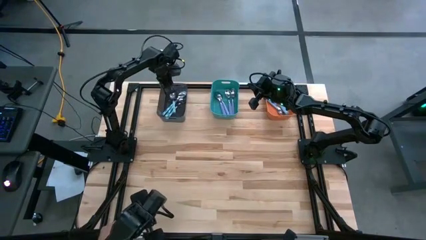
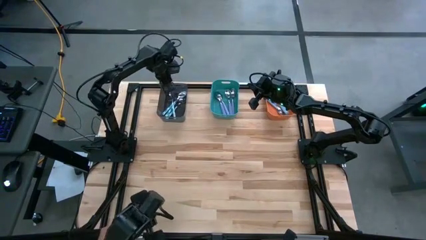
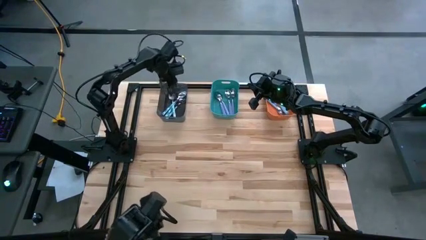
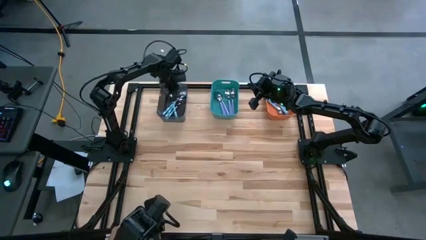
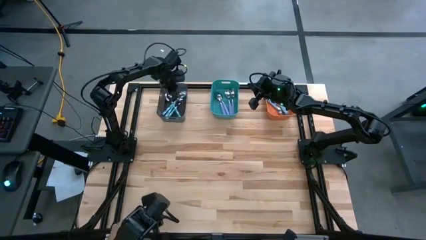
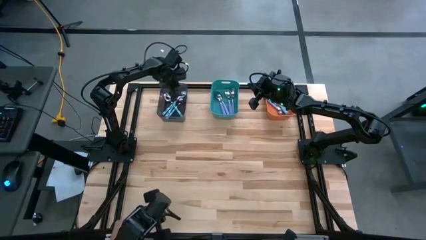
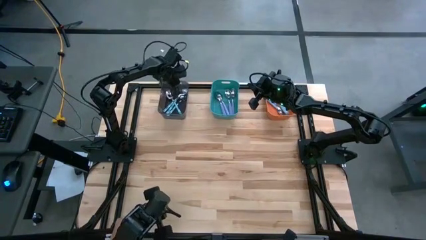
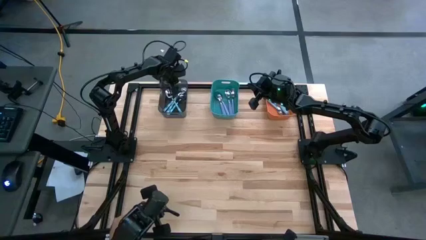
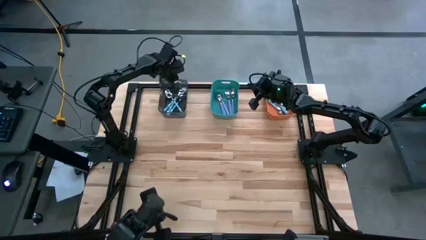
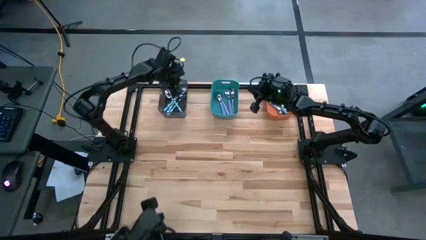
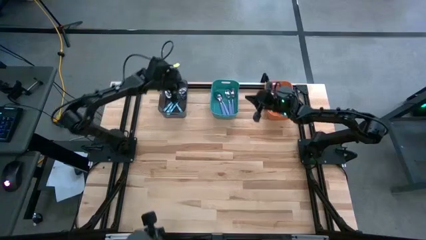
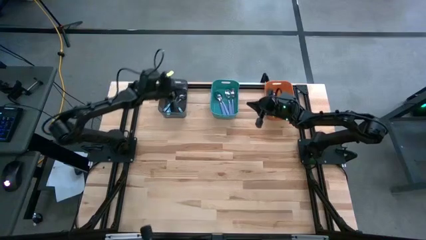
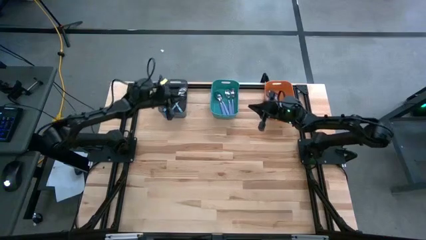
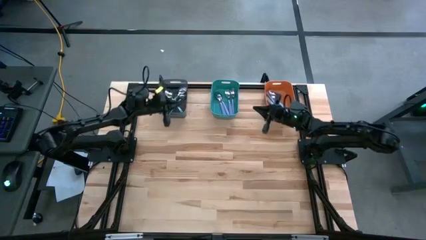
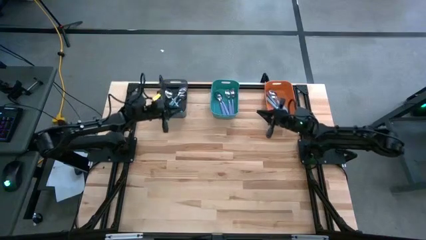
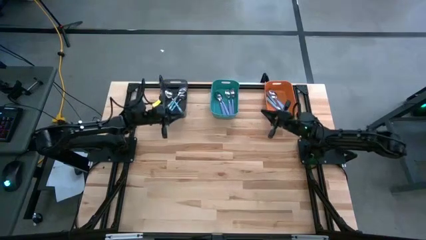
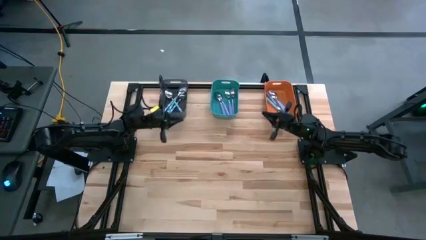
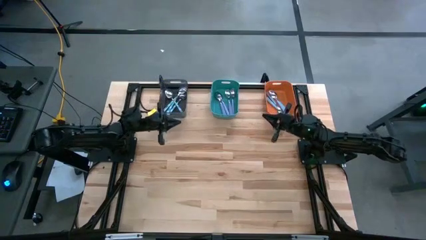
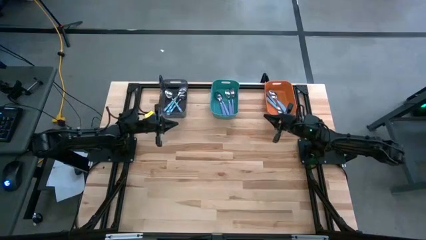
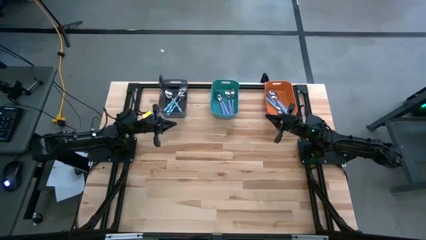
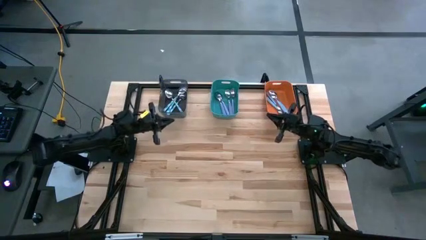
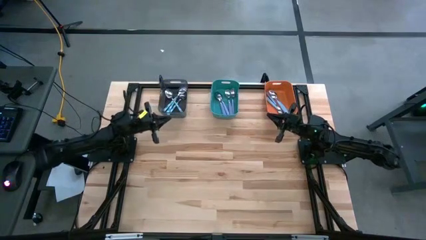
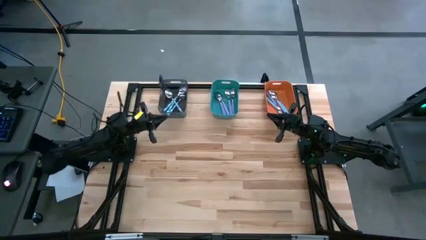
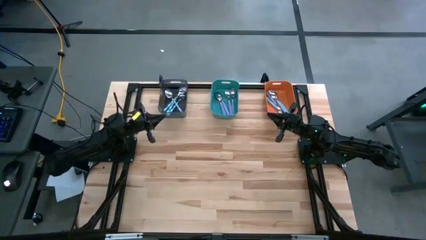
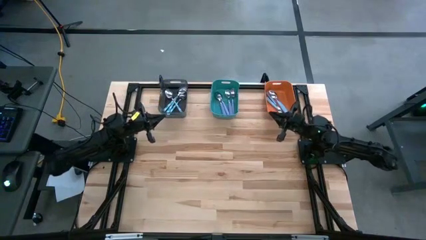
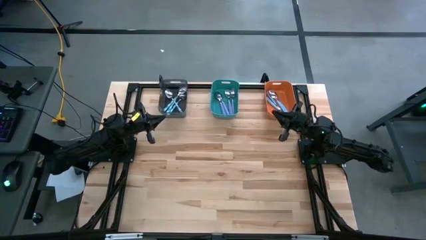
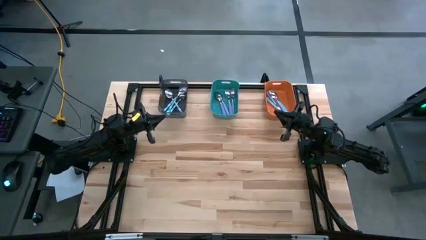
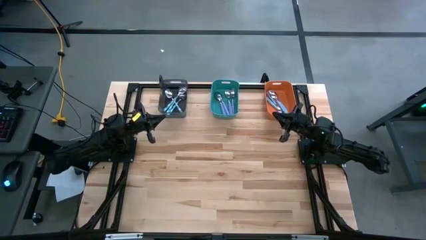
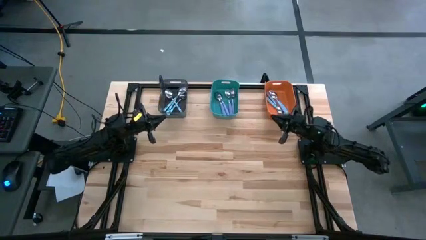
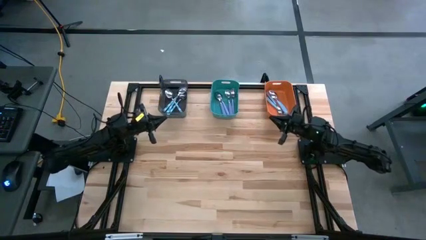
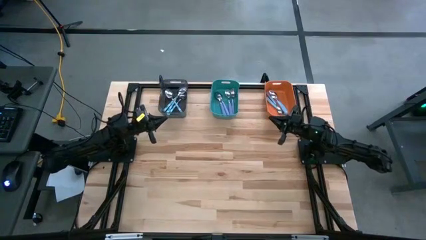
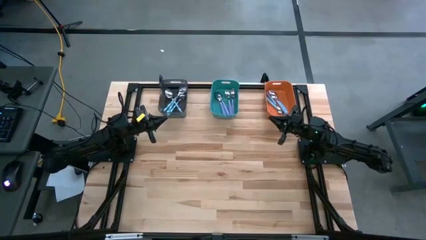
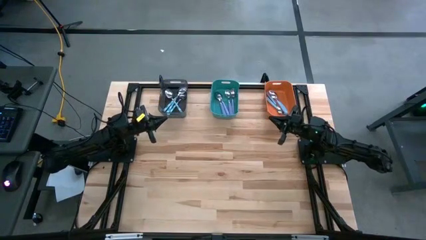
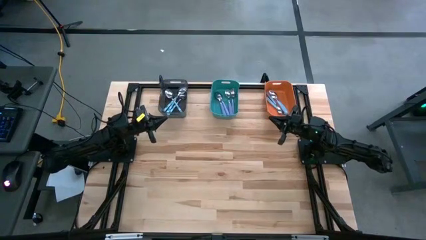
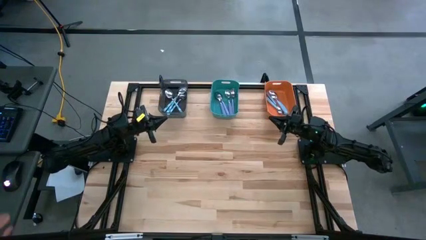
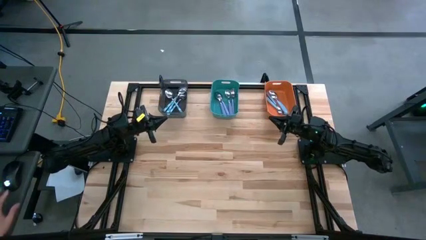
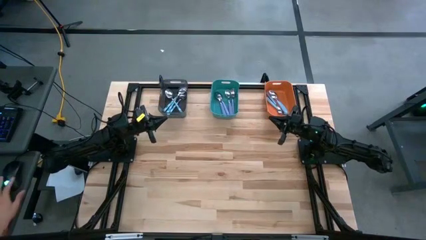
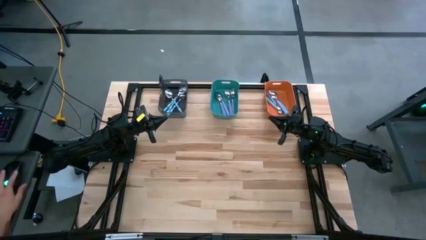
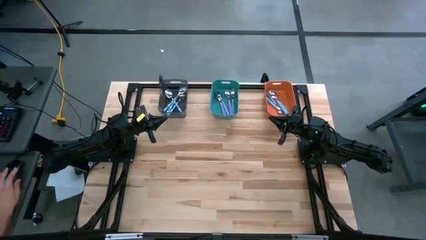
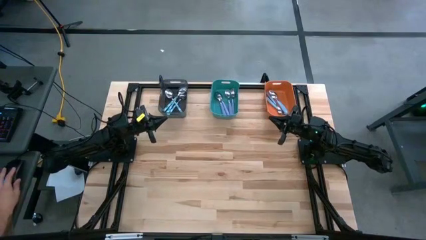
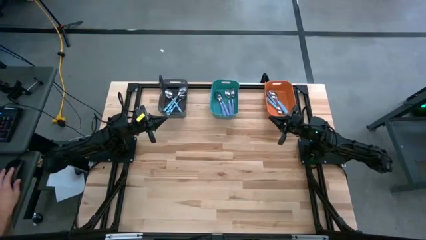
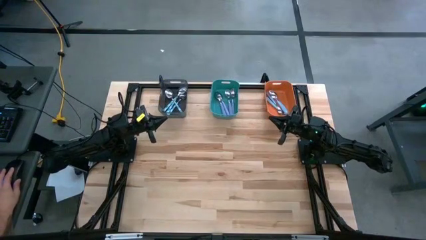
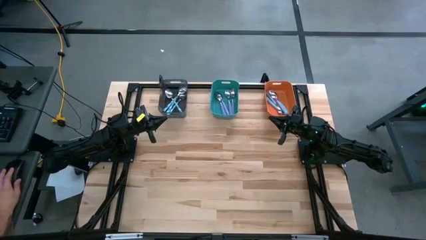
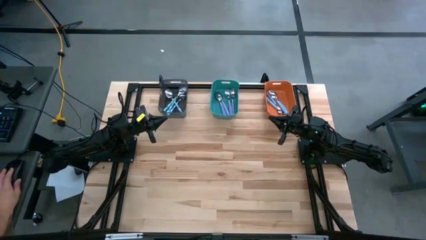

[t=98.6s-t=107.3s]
Task: Sort silverware by color (type)
Return to Home Position

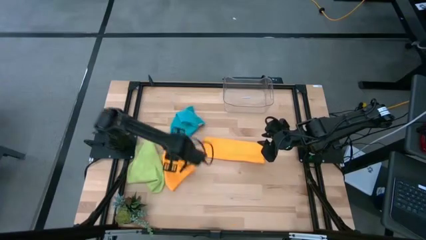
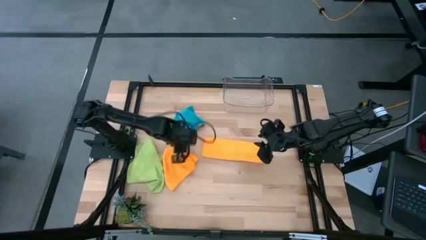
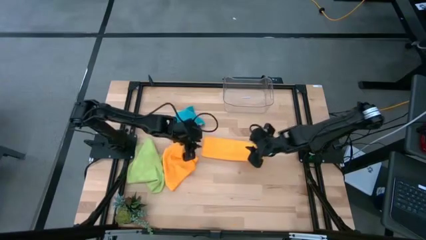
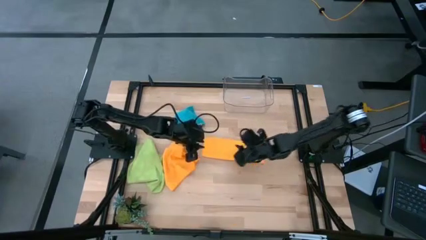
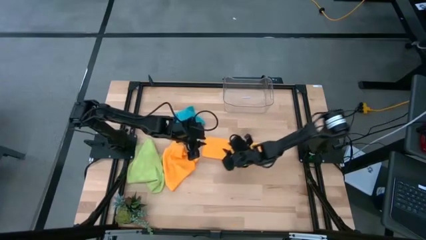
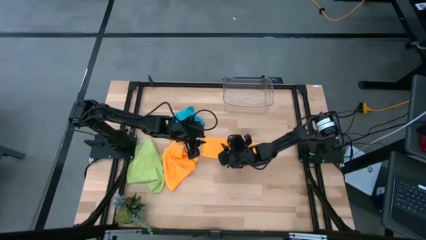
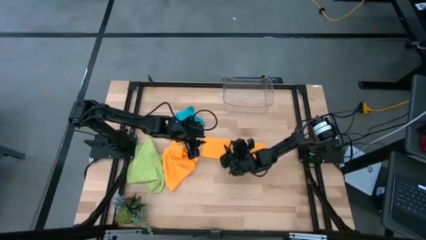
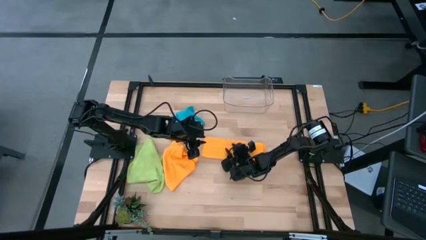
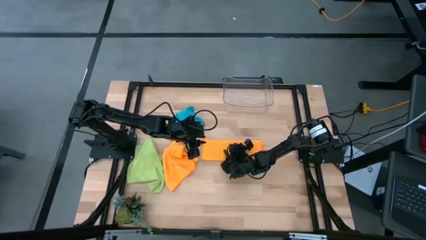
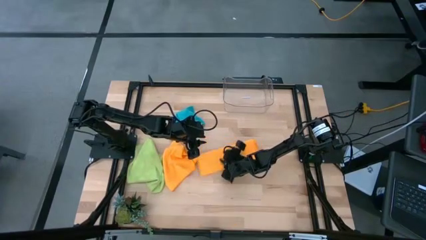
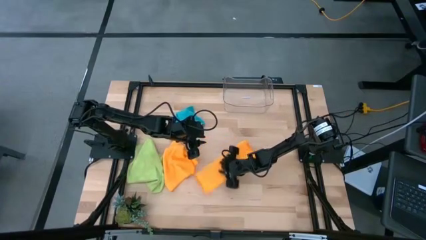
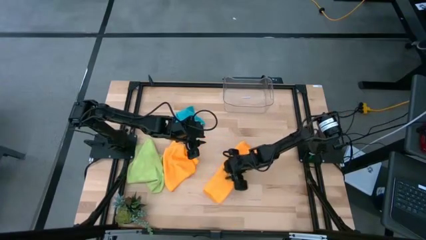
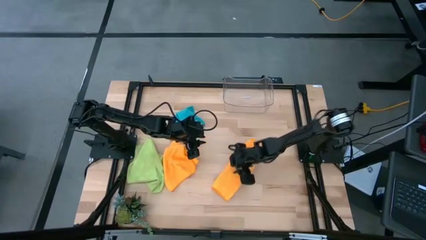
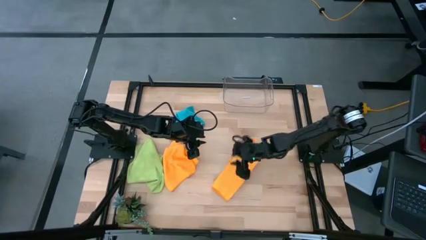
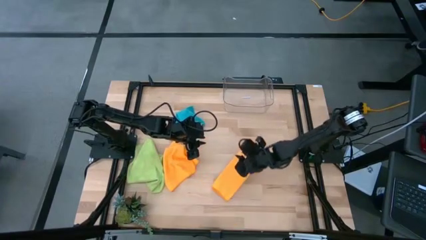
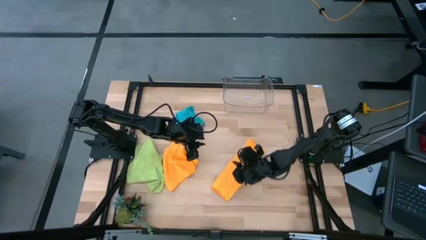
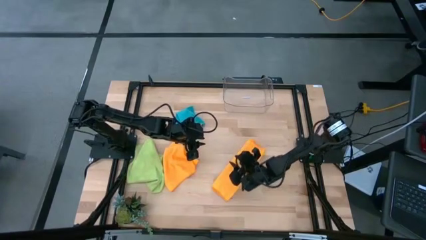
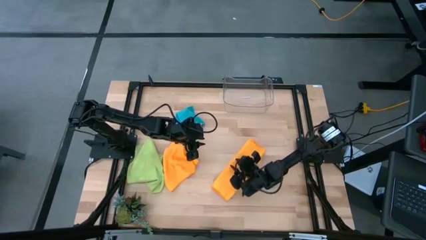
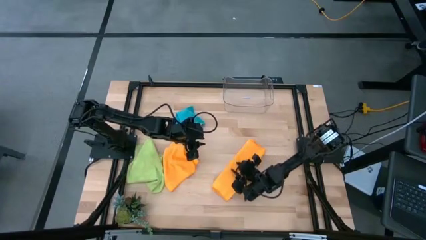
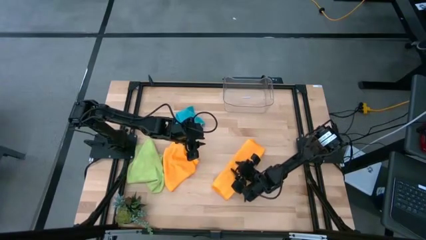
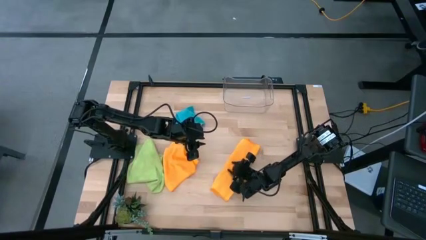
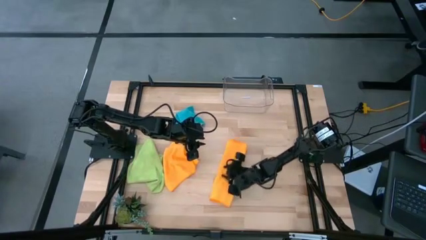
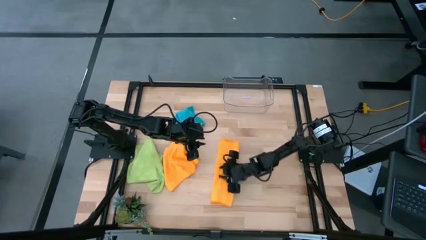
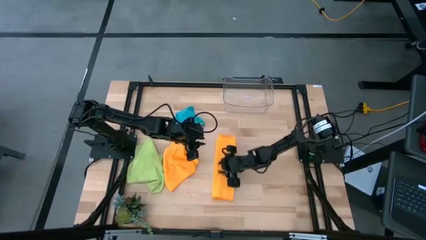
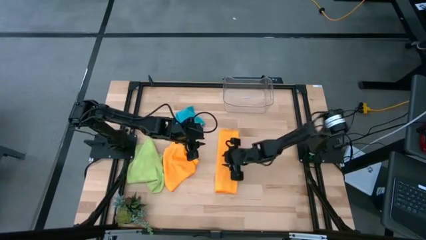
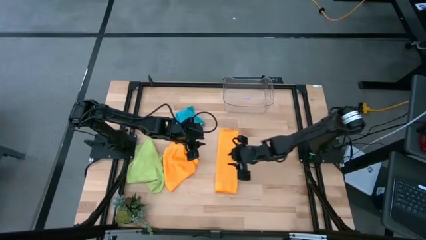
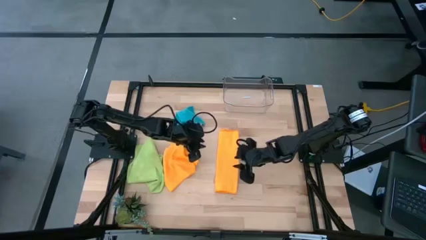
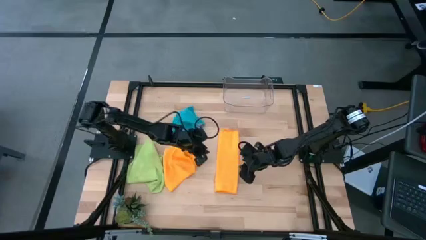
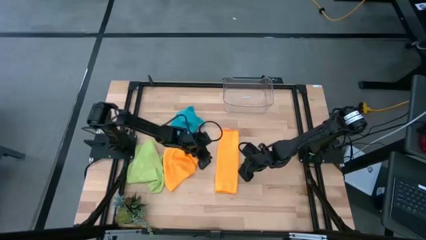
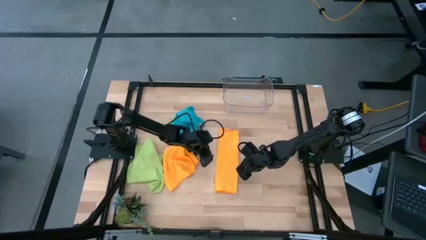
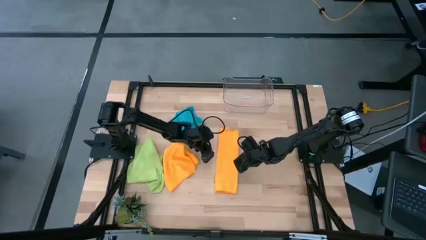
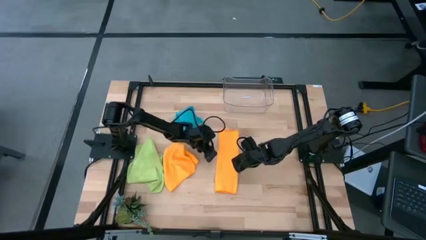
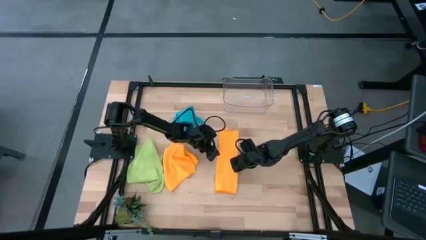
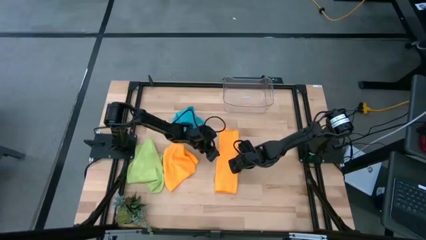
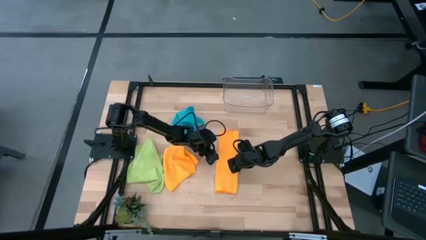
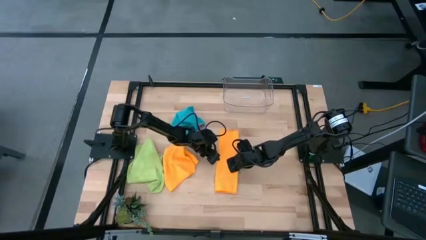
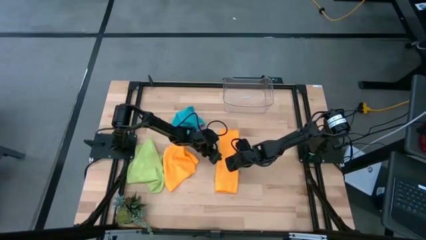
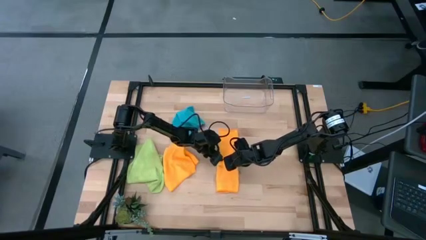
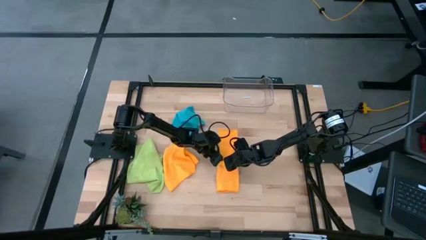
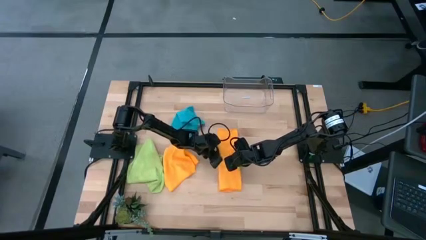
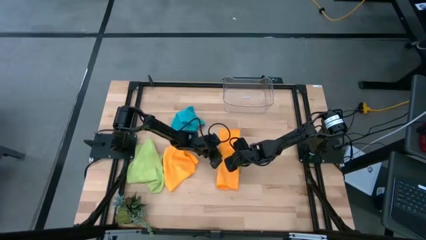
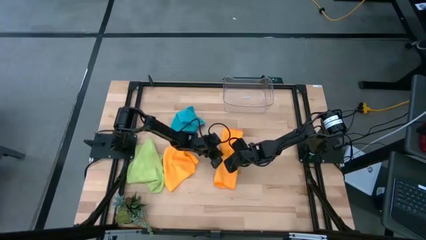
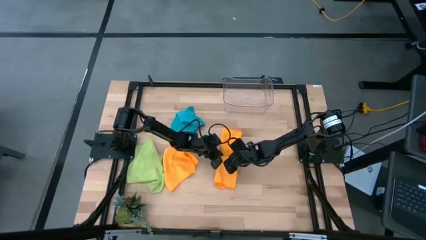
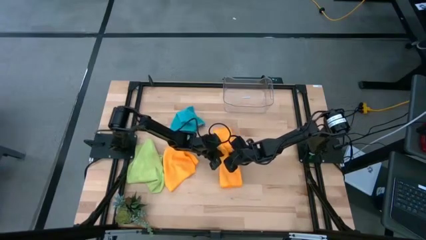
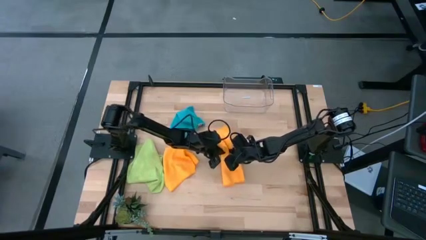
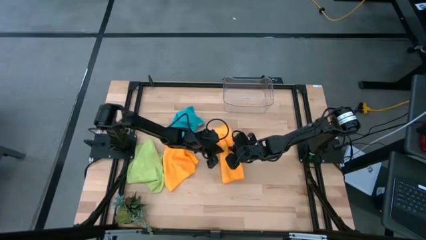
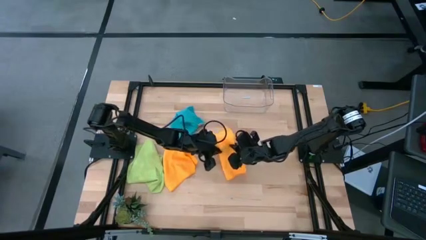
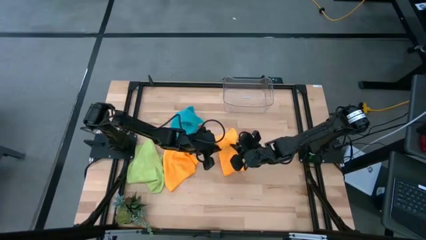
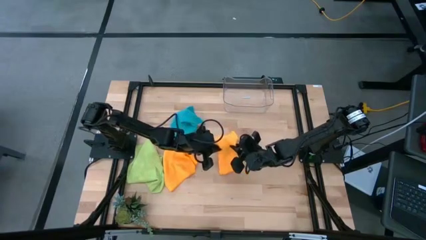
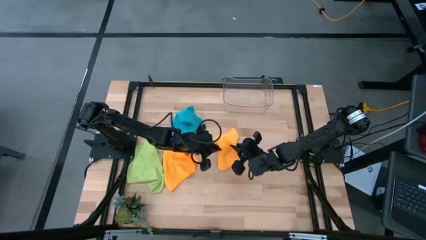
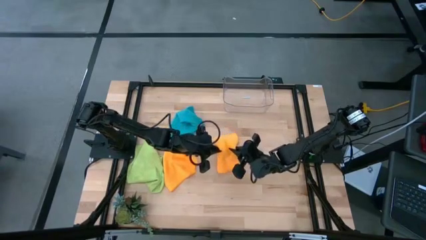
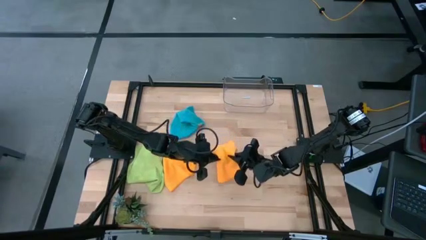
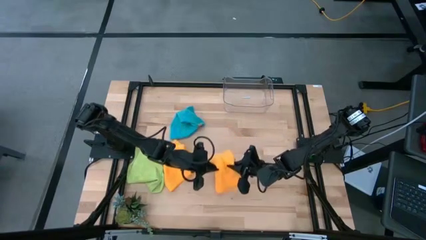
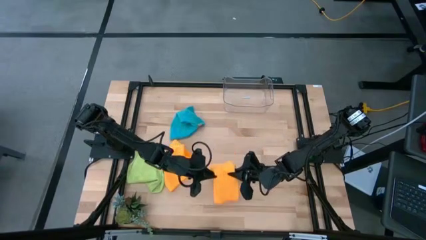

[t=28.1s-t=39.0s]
Task: Fold microfiber towels
Fold the right orange microfiber towel
